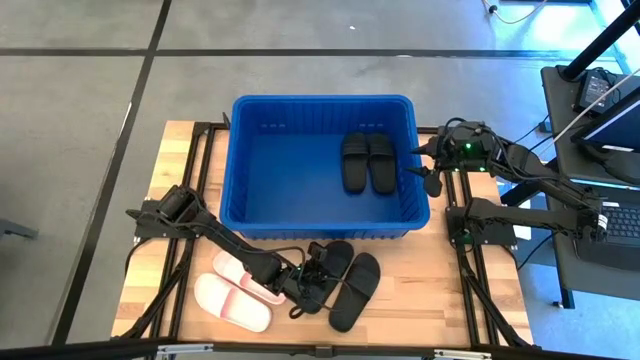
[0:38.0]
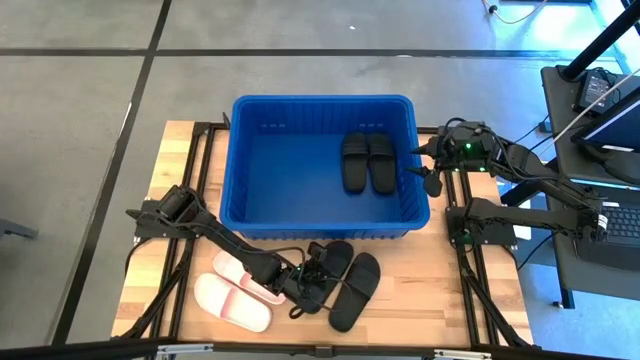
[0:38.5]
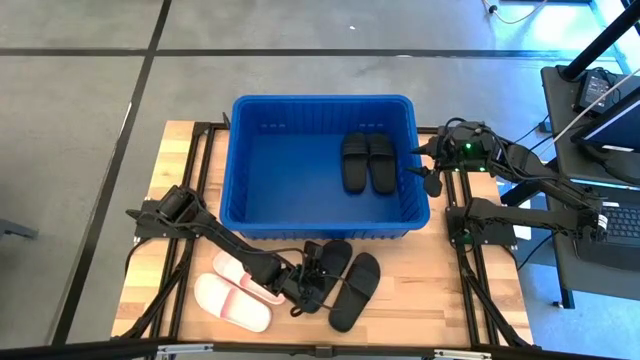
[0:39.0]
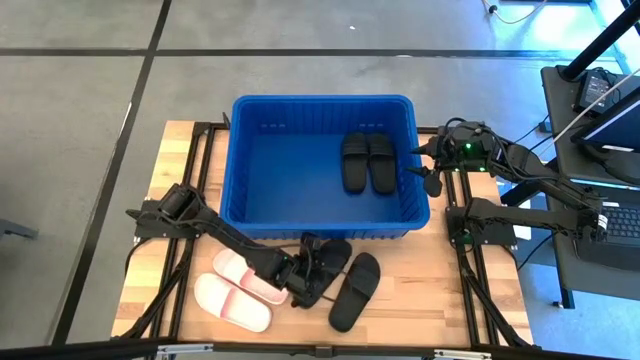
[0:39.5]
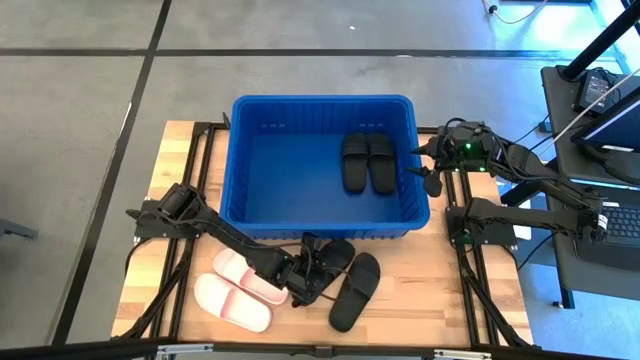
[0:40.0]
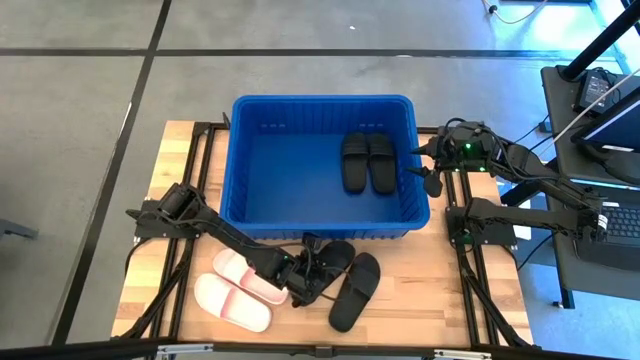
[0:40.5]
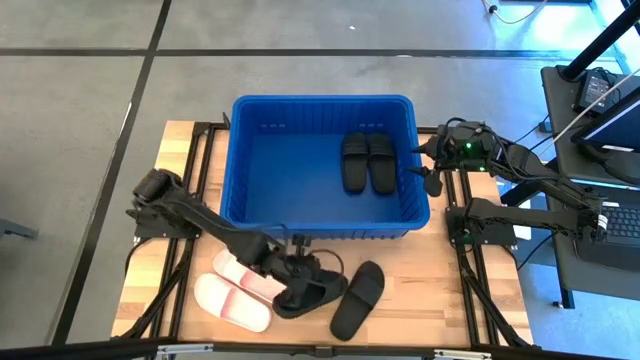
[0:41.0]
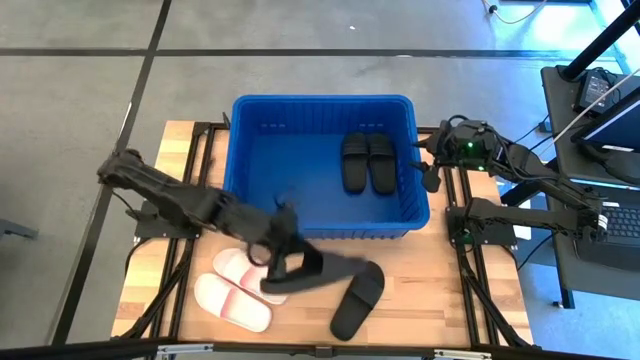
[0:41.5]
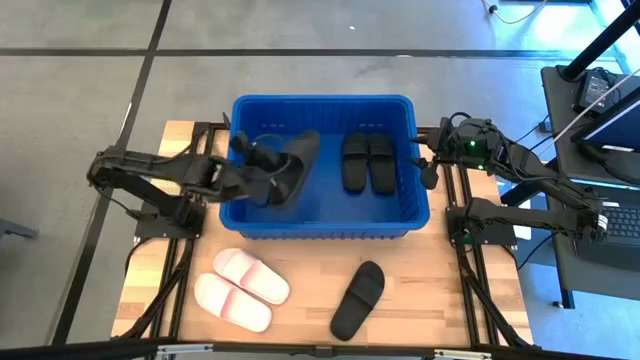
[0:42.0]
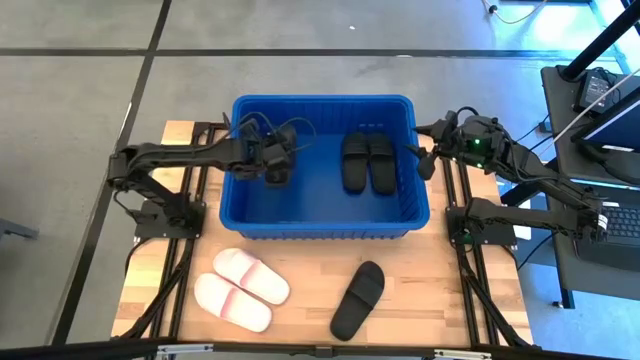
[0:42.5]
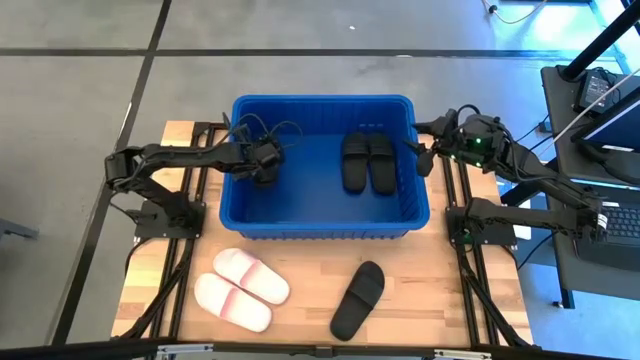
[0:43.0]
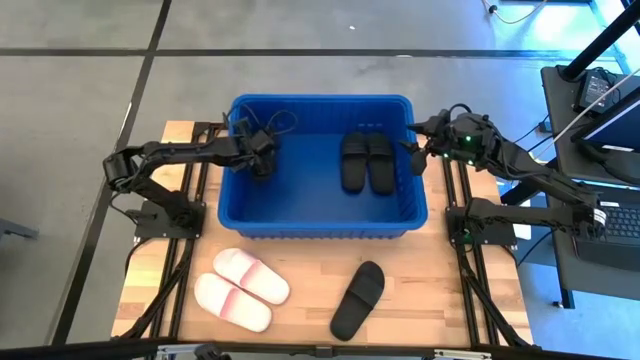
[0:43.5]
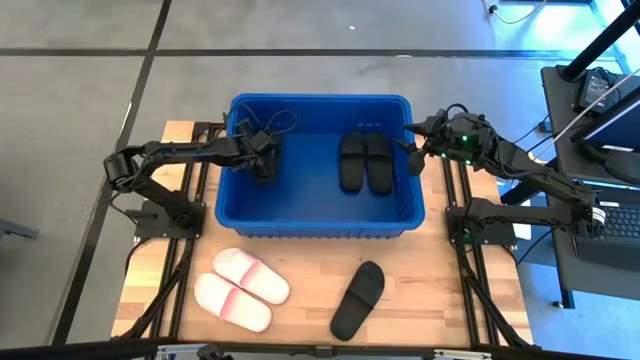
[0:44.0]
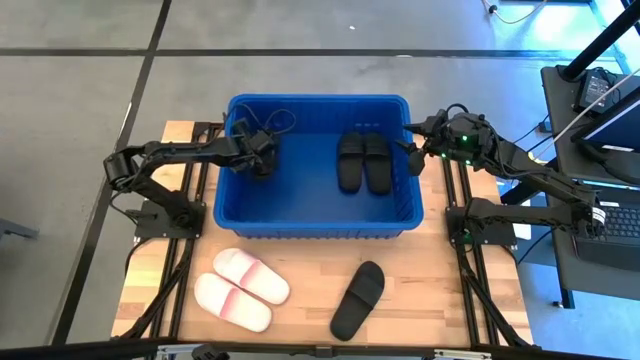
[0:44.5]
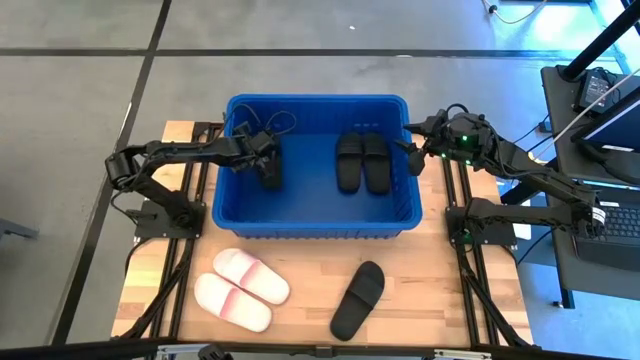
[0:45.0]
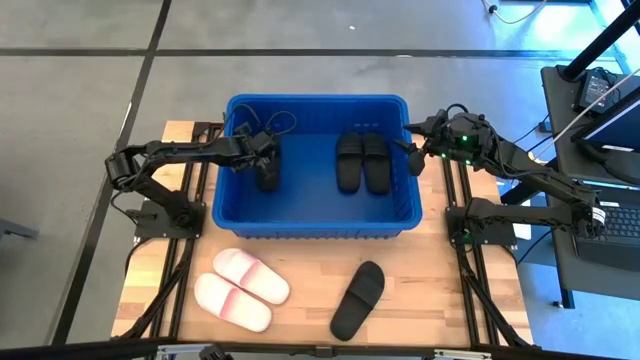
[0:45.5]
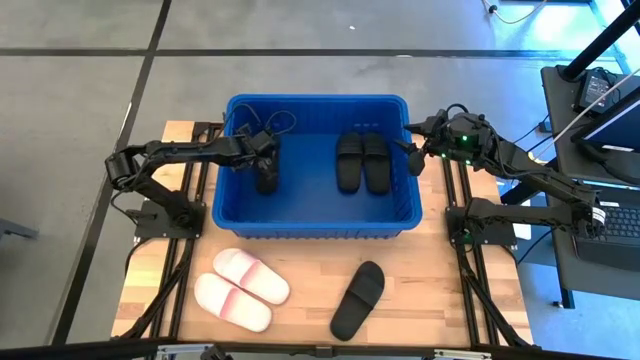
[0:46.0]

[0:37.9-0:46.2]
Task: Pick and place slides into bin
Put the black slide into the organizer bin

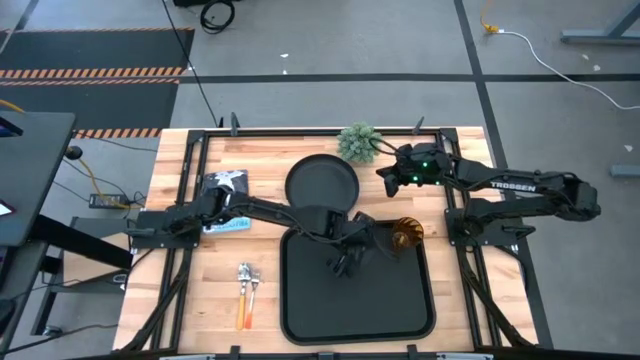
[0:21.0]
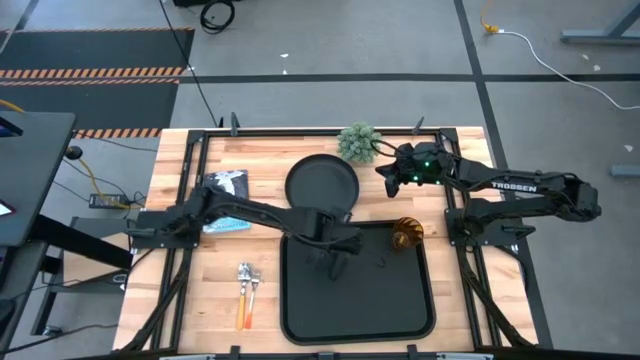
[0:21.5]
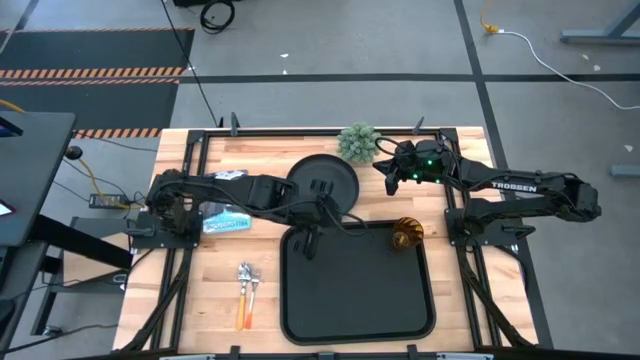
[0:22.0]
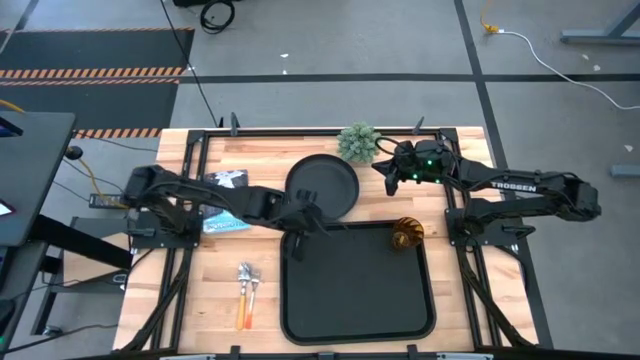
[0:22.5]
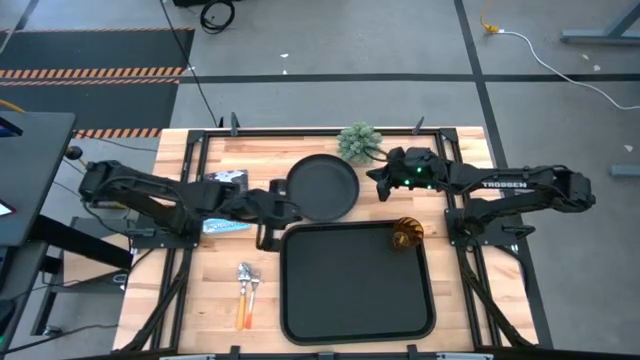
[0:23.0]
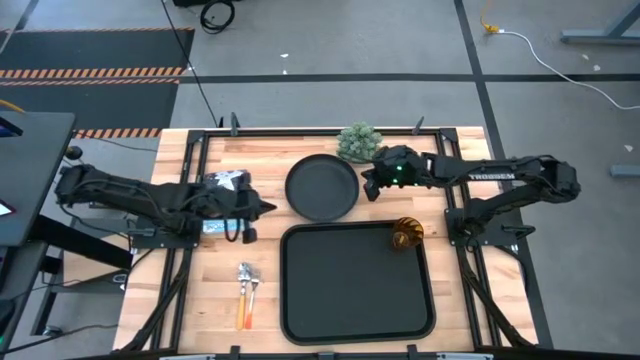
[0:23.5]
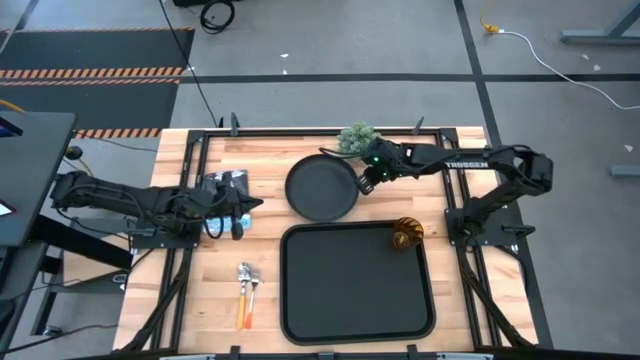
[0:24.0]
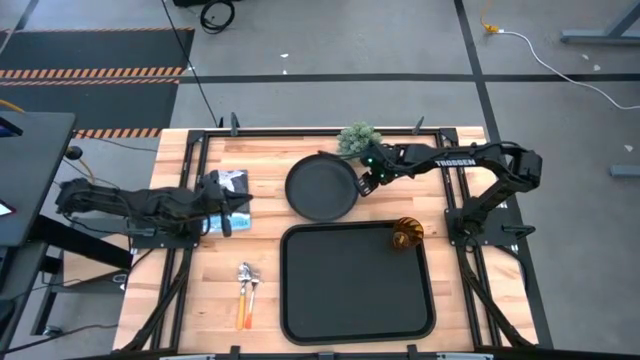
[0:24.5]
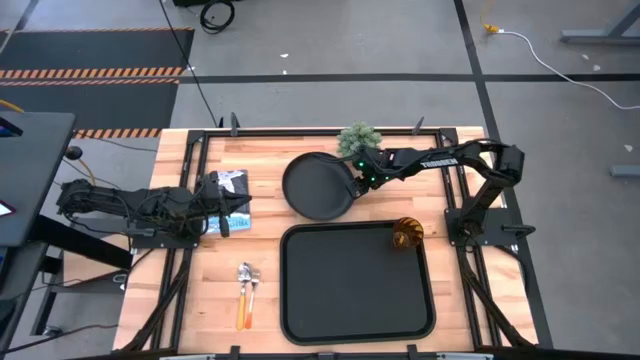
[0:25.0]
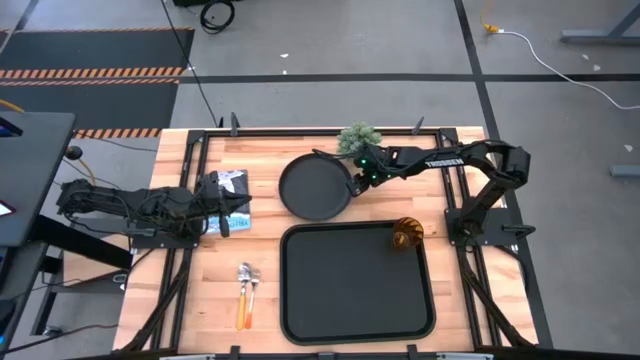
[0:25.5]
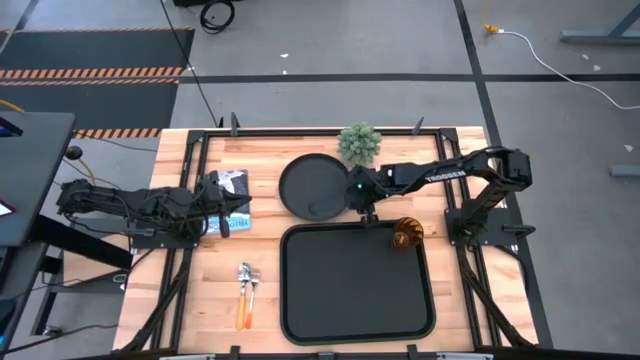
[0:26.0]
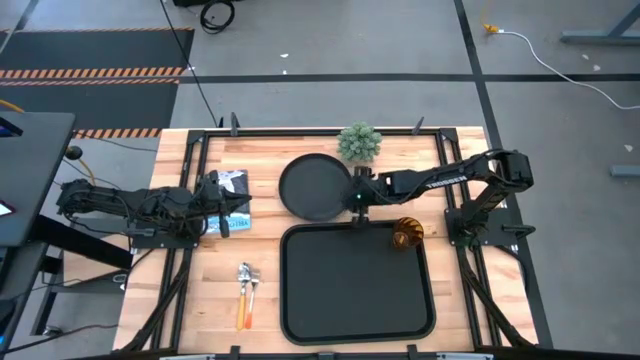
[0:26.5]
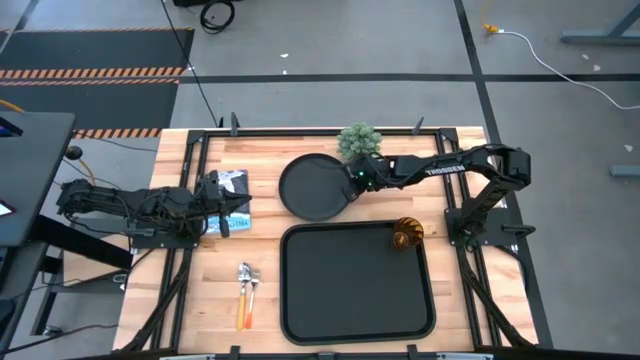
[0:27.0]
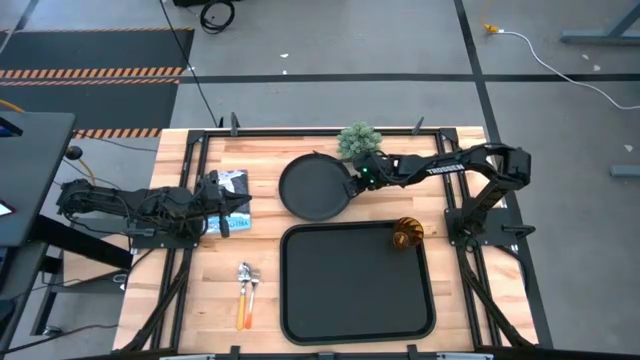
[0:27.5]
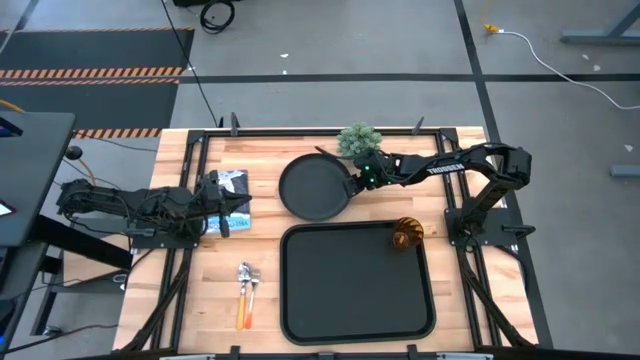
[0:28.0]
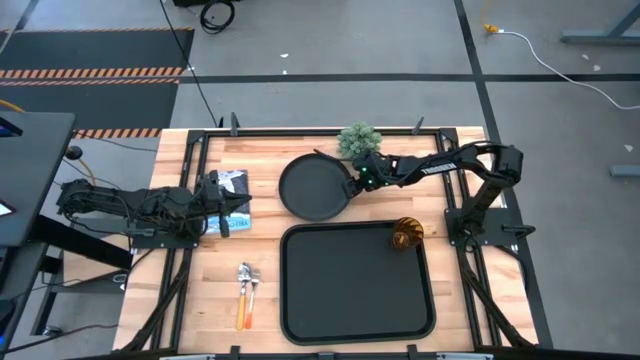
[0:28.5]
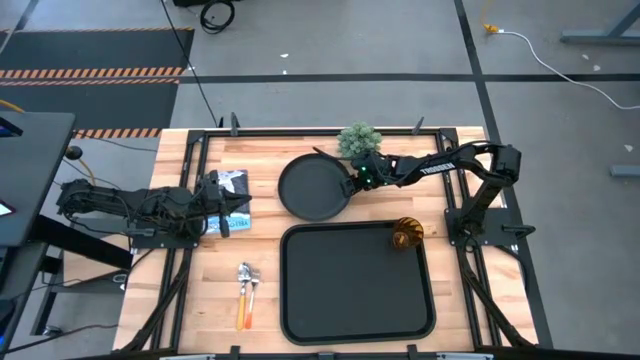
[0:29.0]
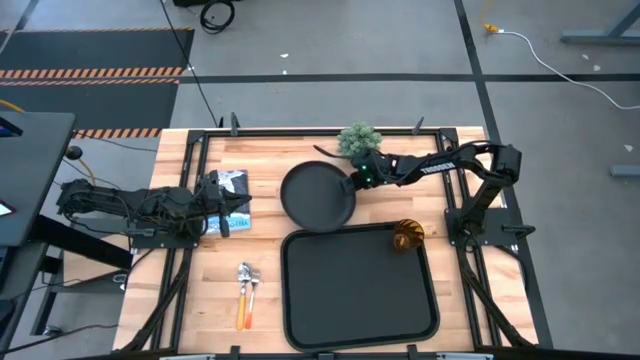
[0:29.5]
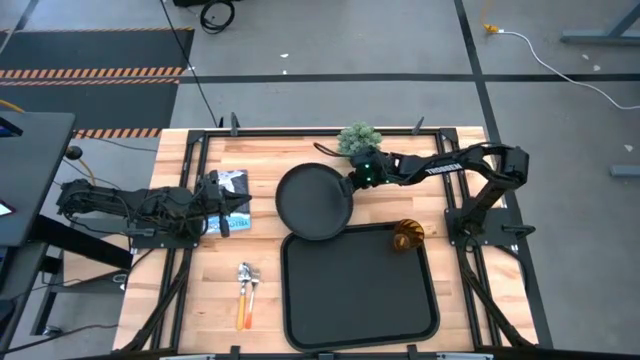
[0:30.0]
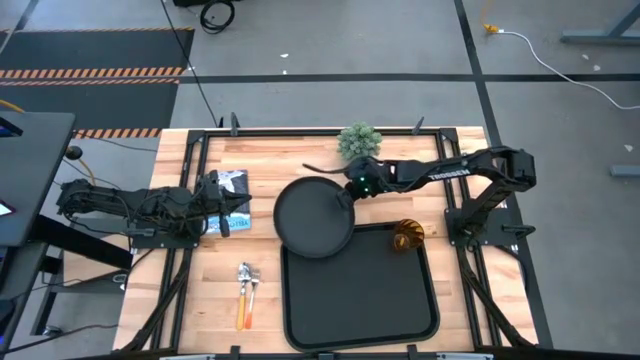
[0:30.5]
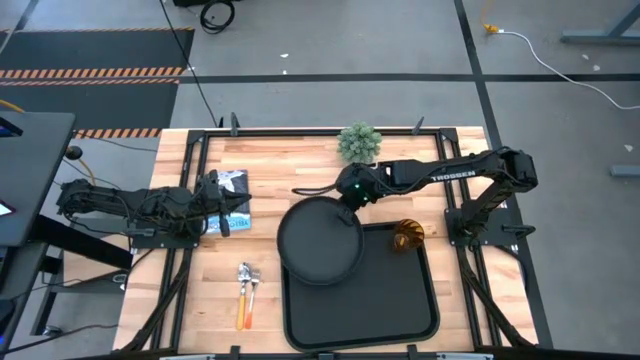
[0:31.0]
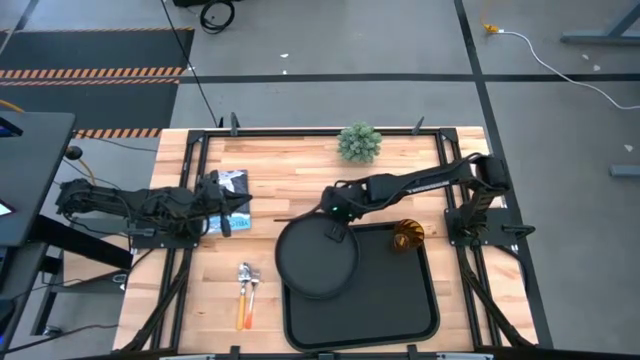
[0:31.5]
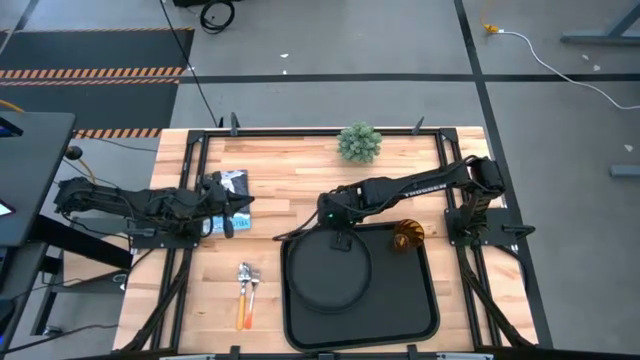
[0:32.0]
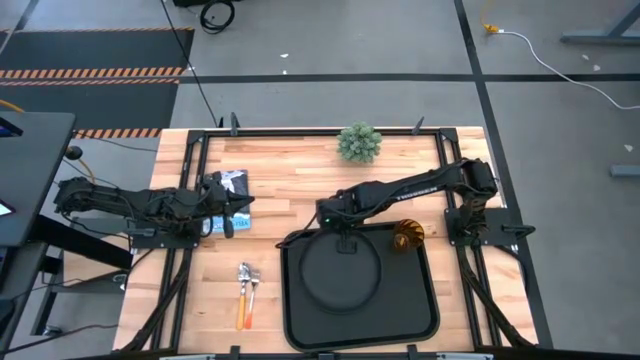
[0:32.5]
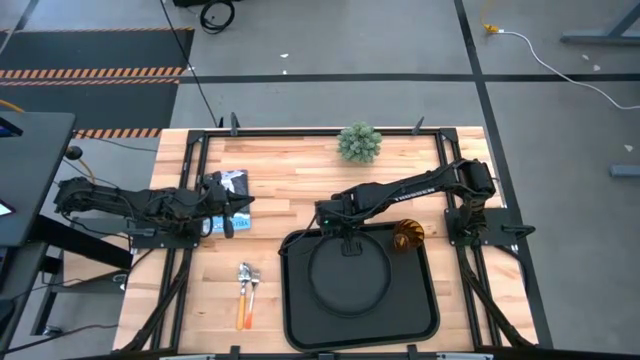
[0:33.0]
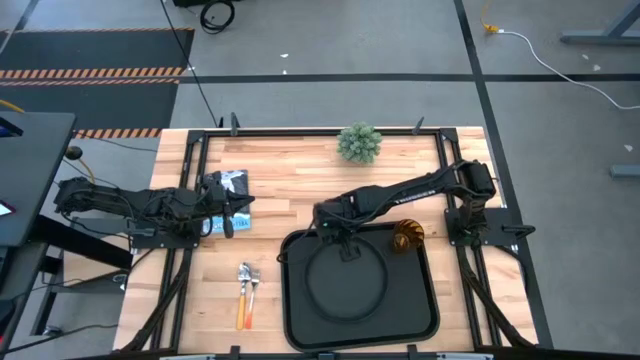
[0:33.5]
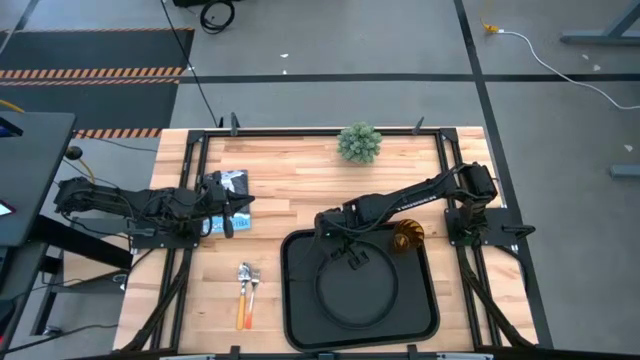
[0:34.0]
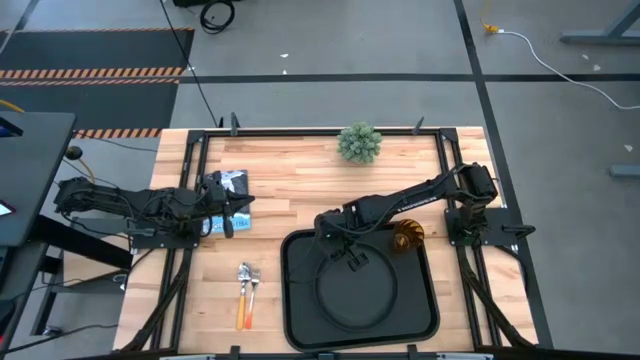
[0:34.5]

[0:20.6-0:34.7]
Task: Pick and place plate/cup/fork/spoon on tray
Put the black plate on the black tray
